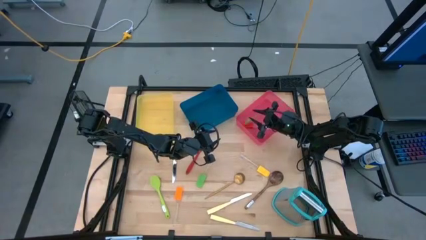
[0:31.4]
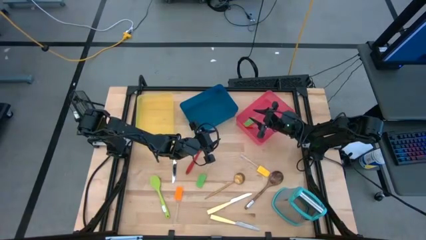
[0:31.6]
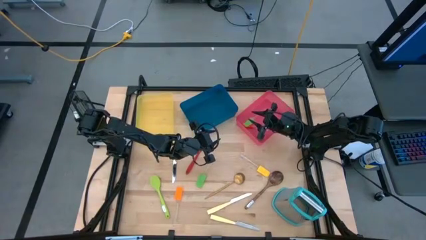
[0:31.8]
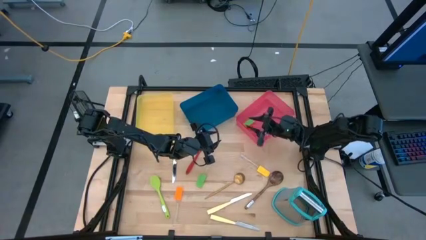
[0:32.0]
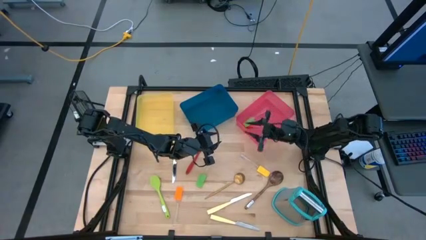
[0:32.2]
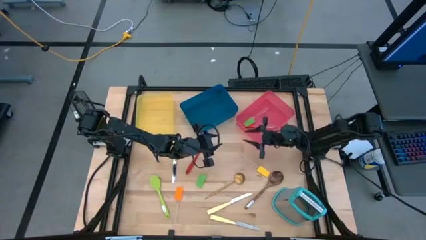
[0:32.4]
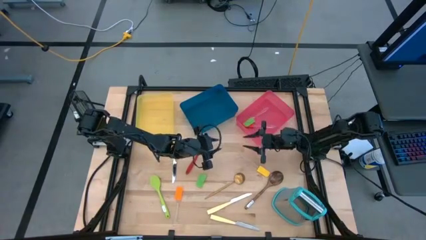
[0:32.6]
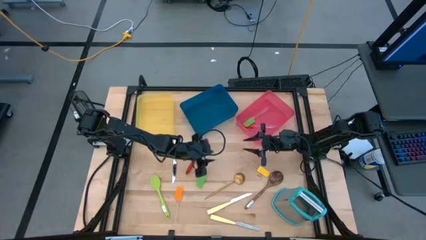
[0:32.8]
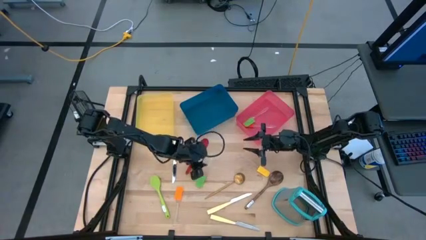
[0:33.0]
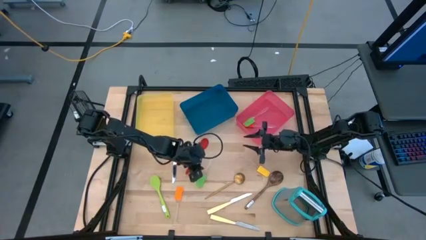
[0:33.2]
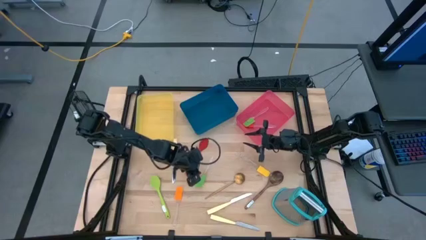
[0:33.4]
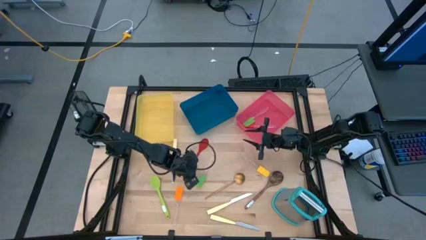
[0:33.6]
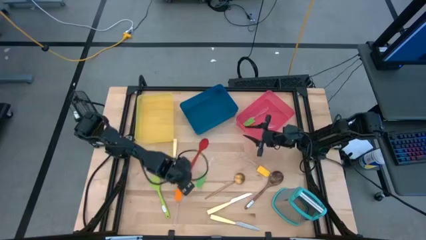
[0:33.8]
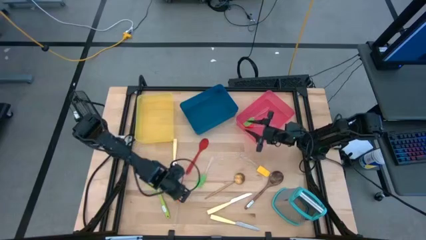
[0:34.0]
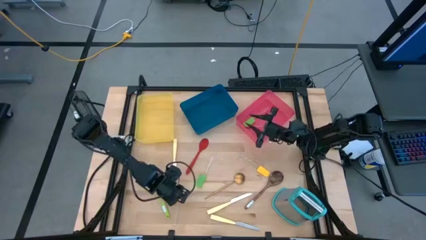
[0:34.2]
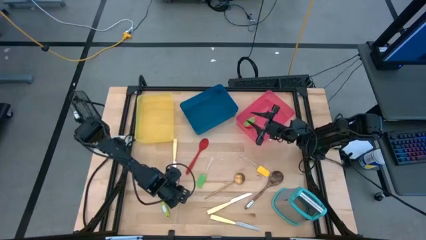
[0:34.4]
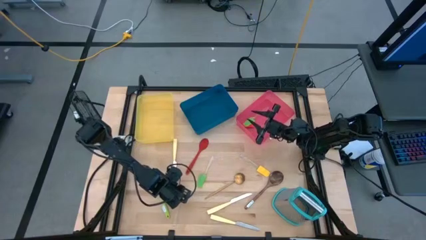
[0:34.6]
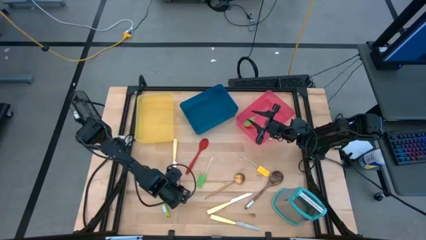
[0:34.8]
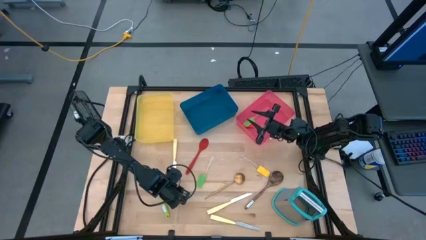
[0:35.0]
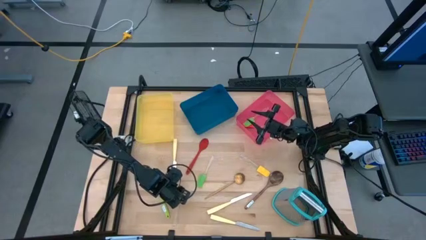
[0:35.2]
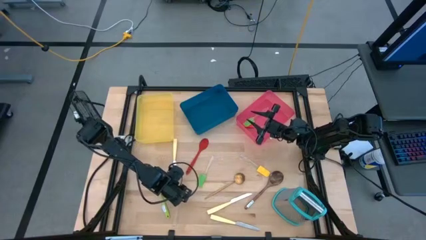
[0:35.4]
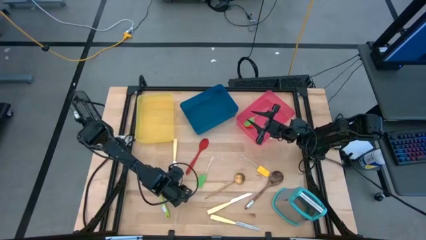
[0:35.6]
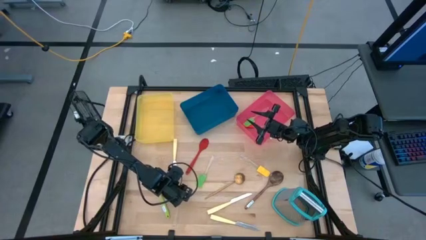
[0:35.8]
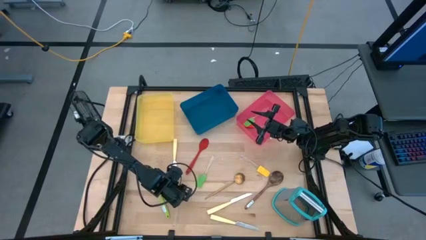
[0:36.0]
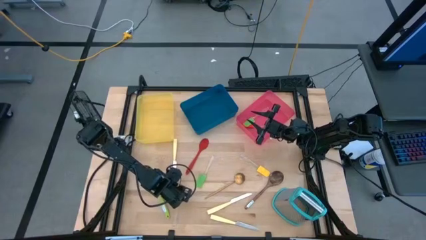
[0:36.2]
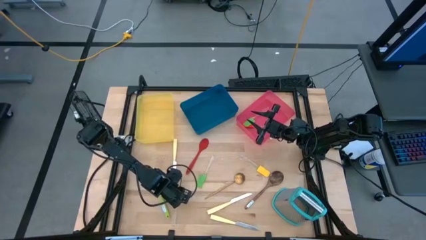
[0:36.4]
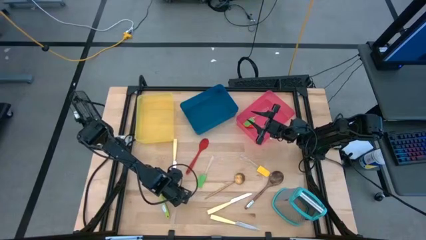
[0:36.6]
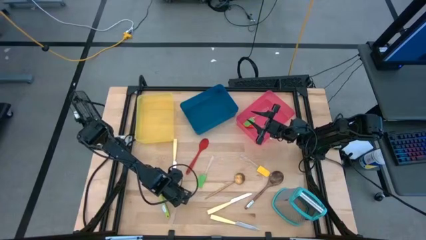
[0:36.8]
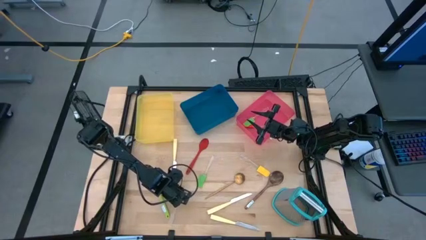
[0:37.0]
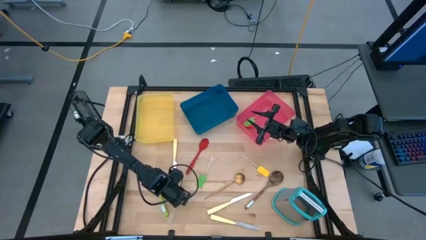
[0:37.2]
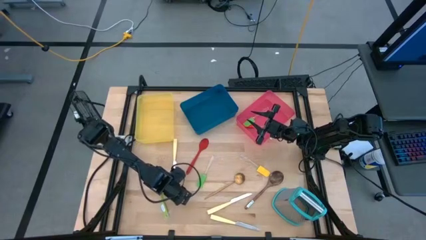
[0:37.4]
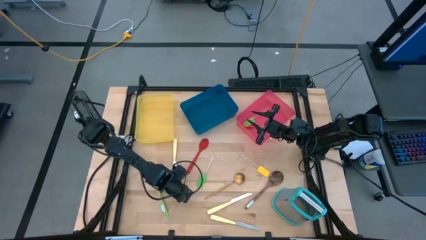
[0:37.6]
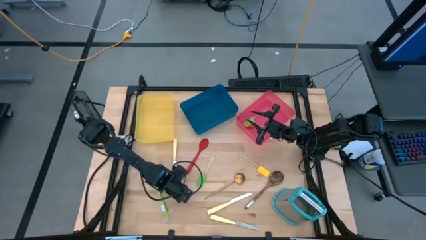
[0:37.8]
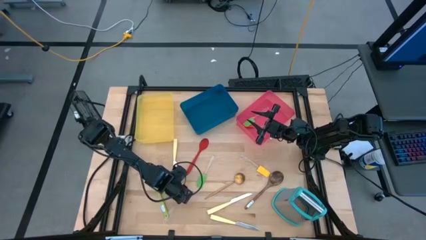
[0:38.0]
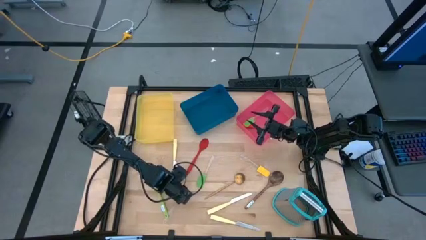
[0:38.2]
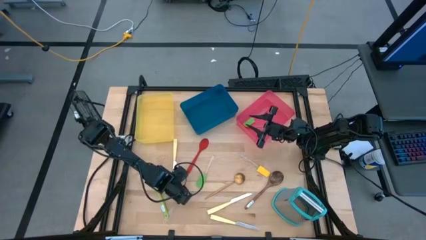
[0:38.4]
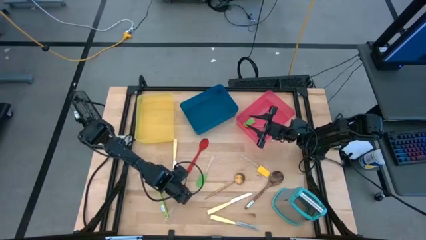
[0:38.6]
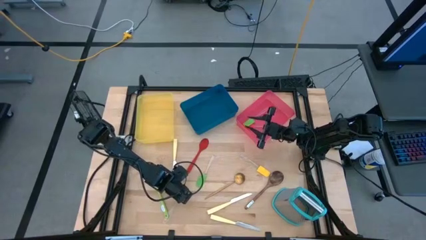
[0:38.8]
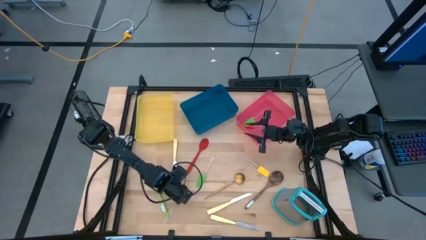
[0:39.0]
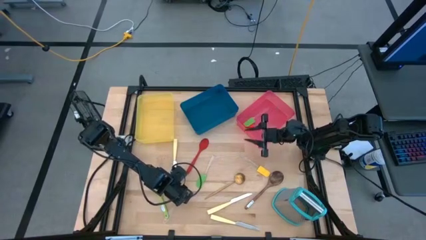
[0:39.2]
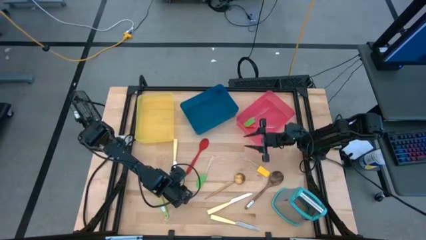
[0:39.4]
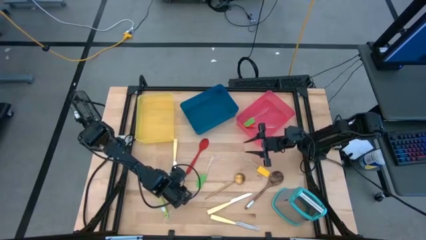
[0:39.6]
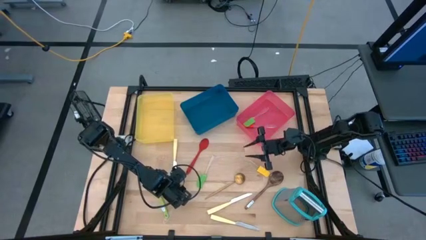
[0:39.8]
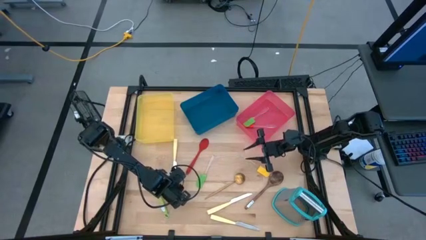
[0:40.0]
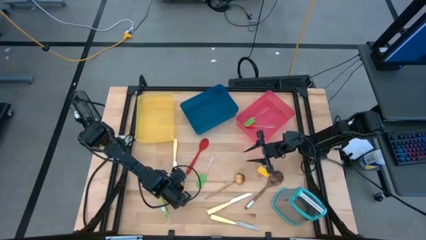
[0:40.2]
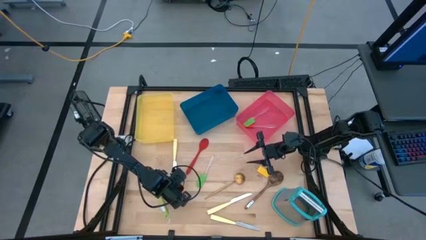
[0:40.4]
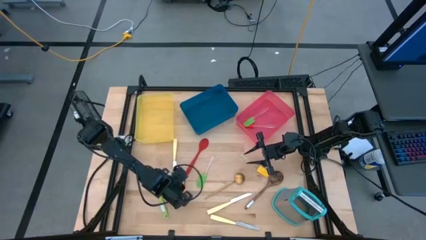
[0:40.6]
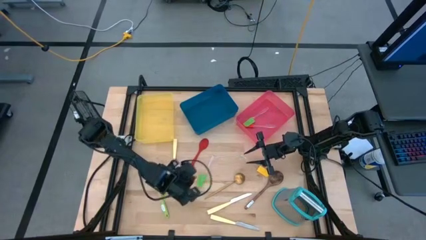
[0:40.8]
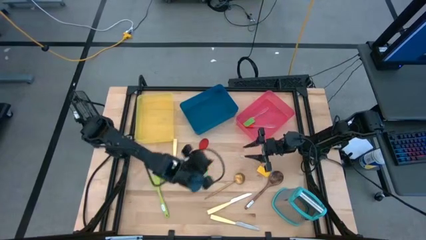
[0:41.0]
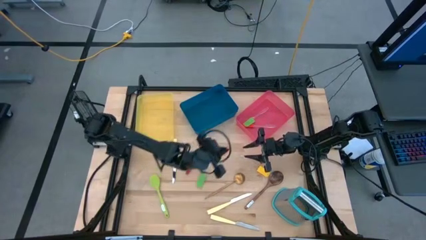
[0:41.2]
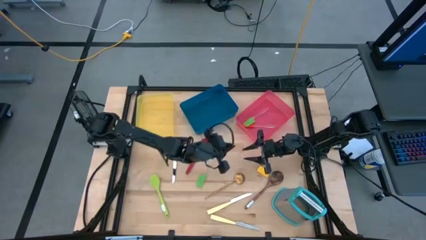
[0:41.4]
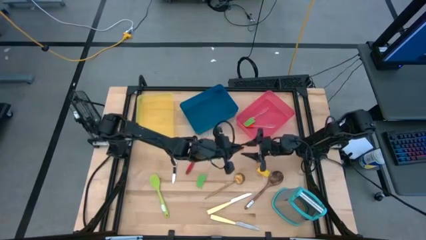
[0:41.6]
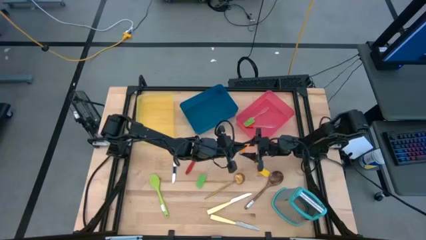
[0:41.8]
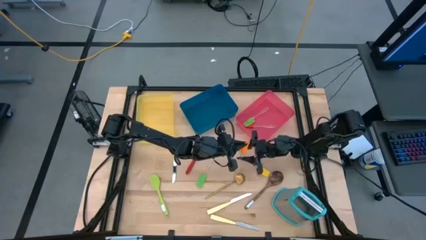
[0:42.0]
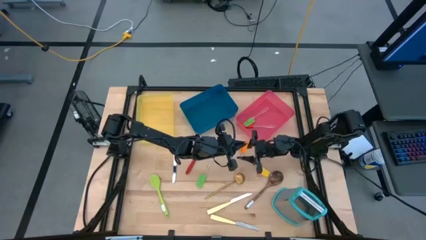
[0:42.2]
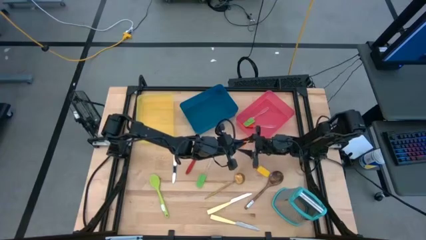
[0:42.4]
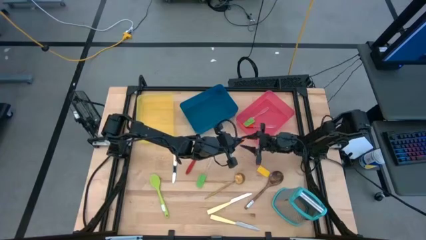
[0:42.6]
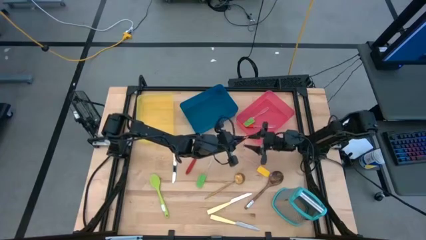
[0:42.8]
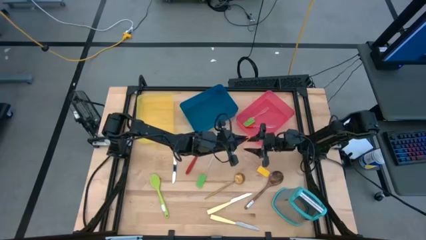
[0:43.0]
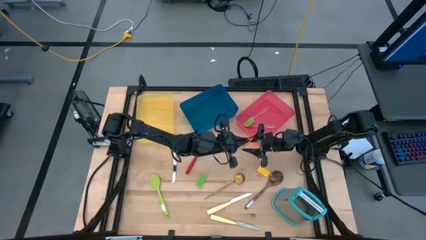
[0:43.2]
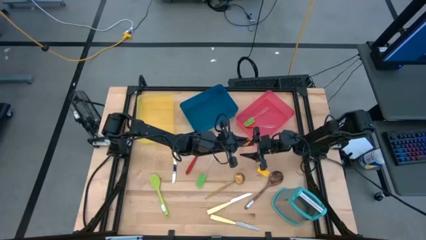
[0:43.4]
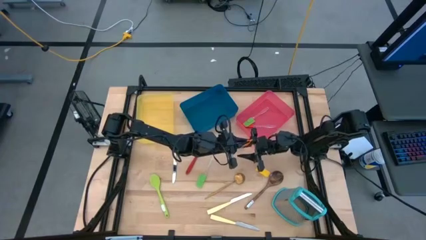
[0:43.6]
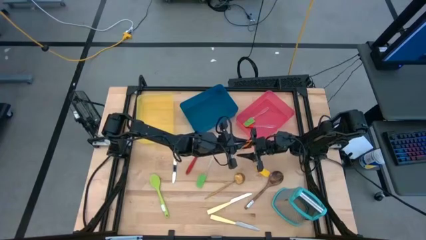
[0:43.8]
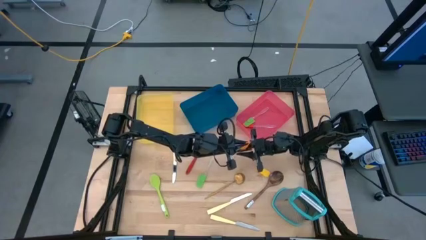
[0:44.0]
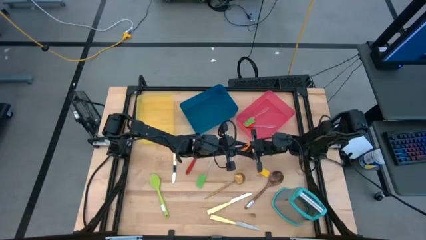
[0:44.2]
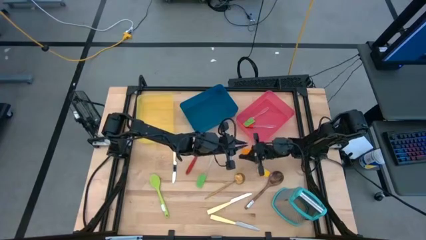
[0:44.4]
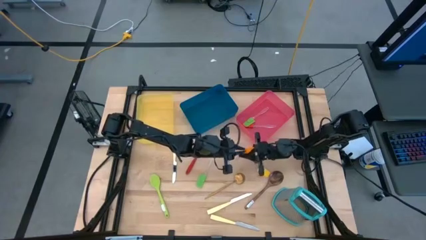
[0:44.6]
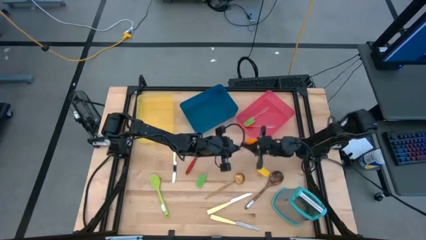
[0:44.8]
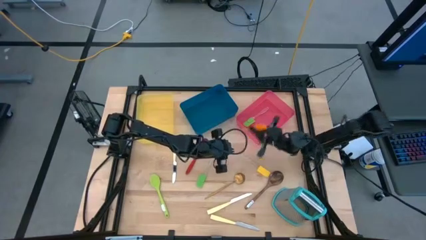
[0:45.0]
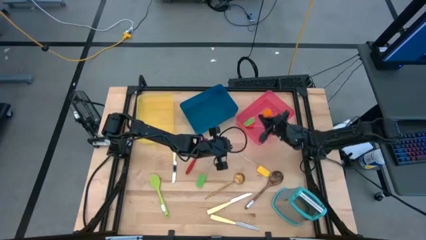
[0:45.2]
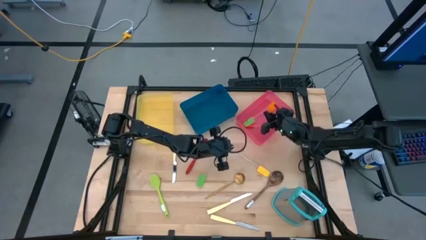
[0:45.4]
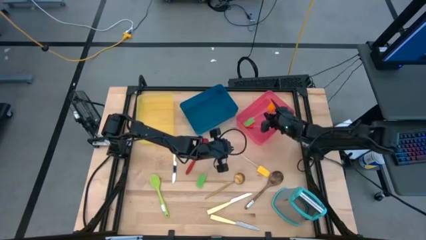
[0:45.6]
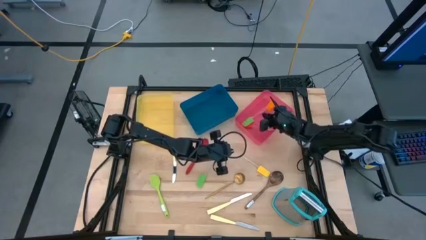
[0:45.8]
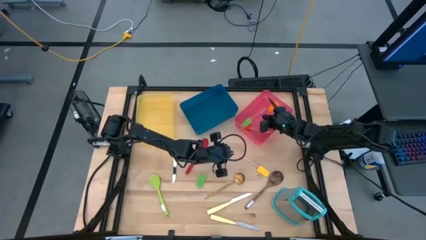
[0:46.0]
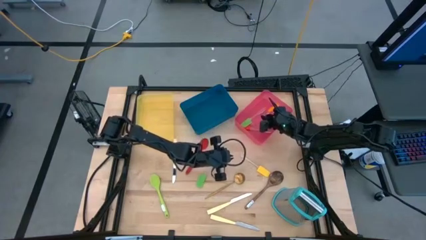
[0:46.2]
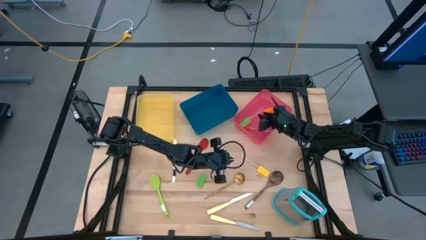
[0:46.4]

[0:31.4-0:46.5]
Task: Pick & Place Kitchen Items
Put the orange spatula into the red bin

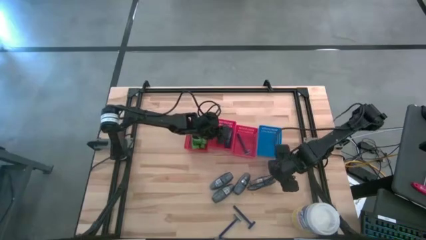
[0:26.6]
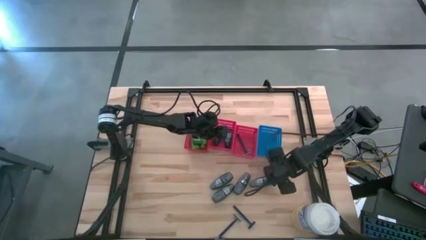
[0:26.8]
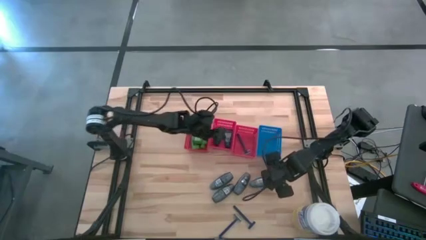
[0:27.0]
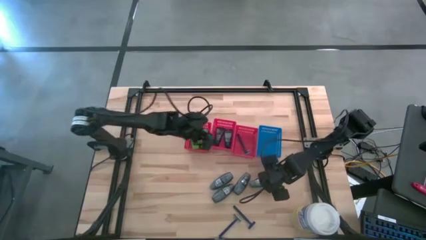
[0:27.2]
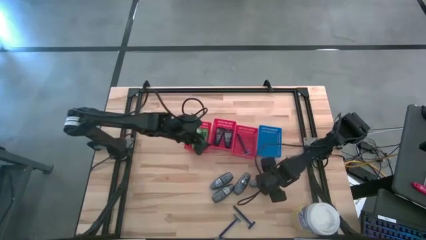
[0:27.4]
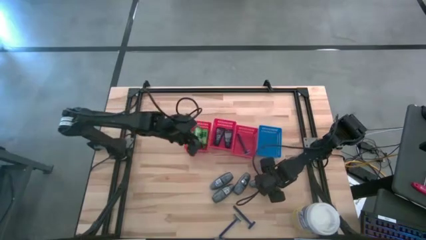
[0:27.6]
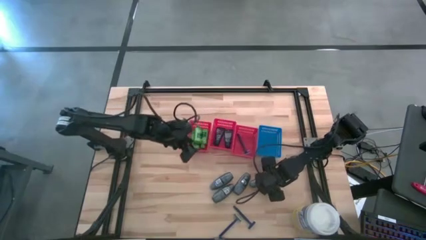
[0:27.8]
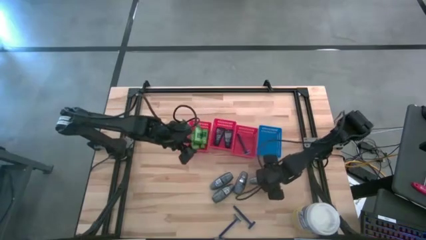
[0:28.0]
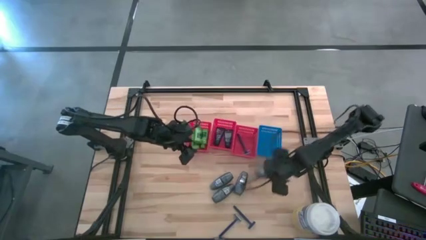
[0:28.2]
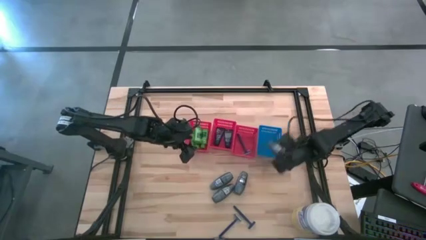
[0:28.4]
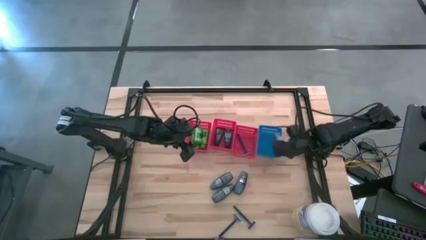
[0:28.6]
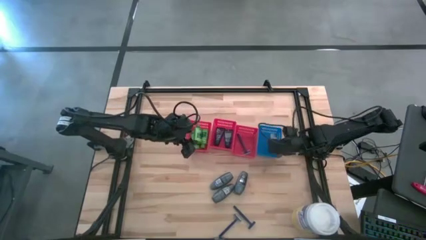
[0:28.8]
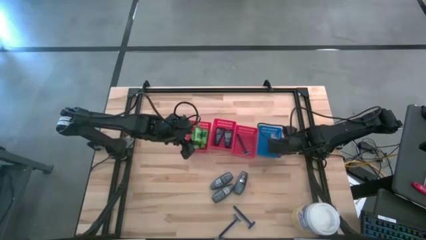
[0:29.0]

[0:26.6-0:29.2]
Task: Pick & Place Travel size toiletries
Put the gray deodorant in the blue bin
